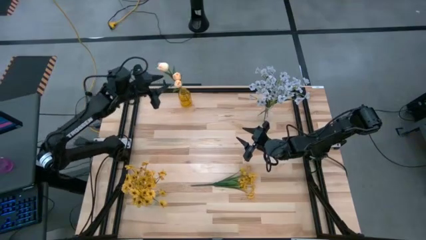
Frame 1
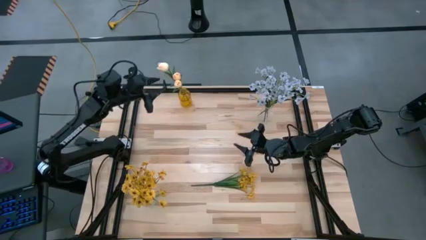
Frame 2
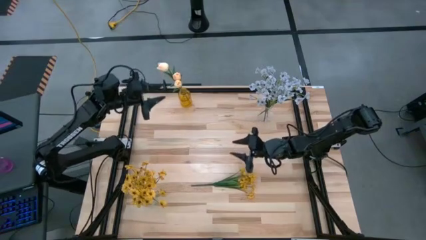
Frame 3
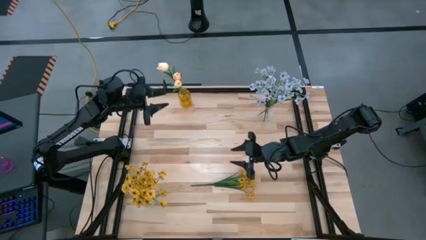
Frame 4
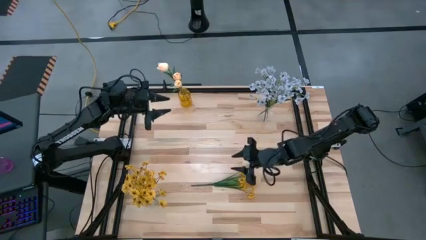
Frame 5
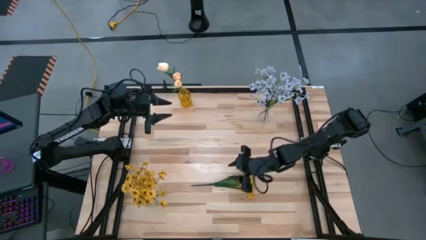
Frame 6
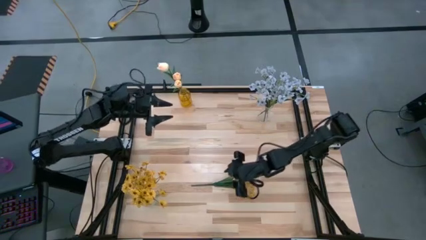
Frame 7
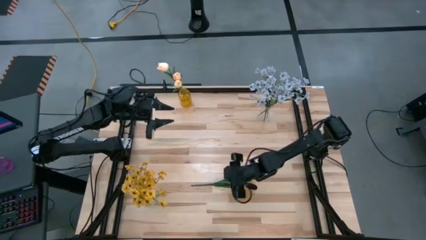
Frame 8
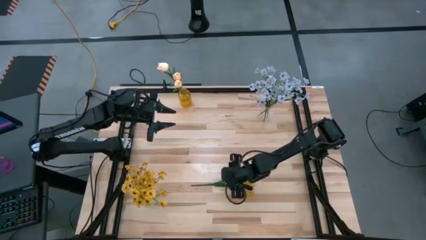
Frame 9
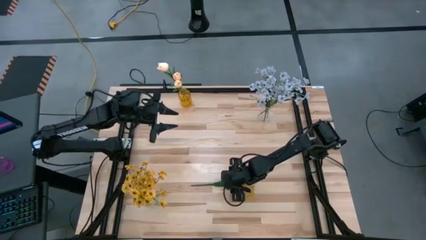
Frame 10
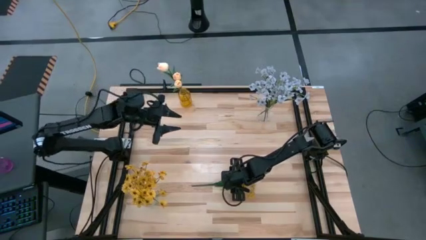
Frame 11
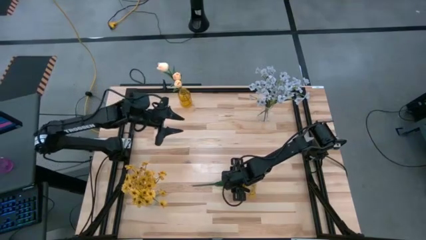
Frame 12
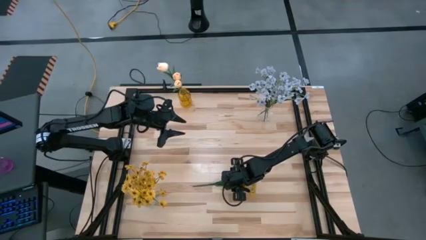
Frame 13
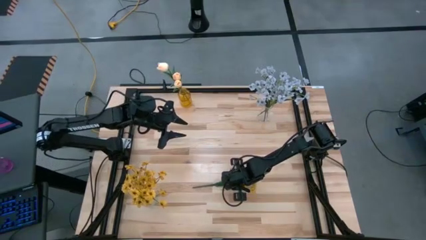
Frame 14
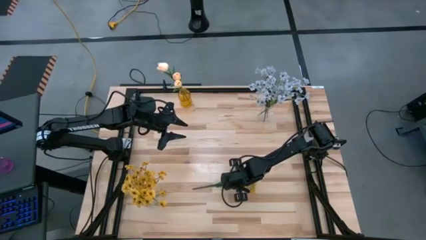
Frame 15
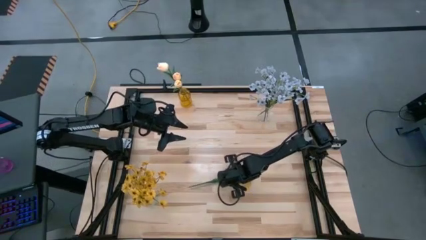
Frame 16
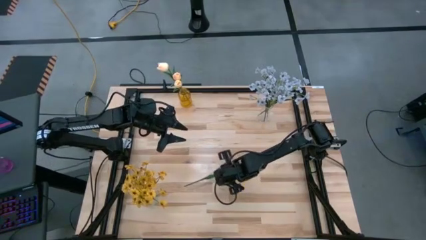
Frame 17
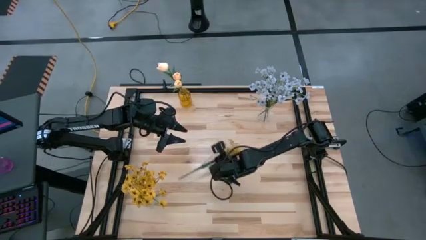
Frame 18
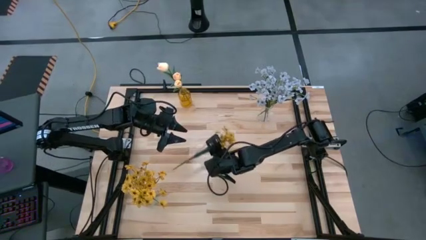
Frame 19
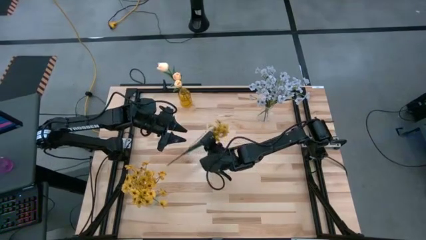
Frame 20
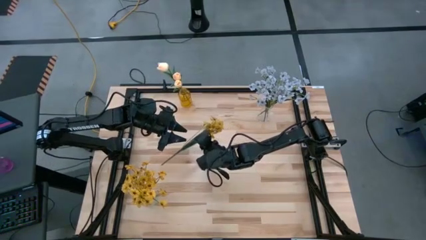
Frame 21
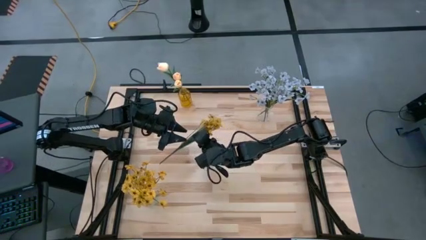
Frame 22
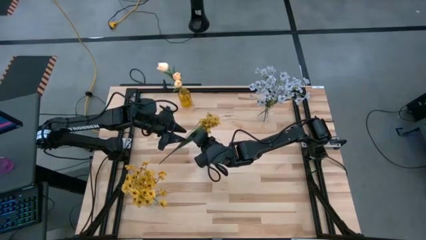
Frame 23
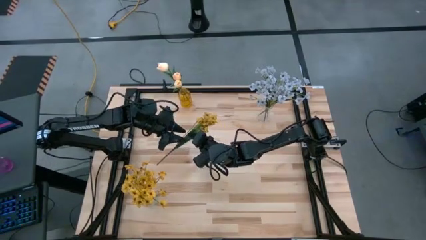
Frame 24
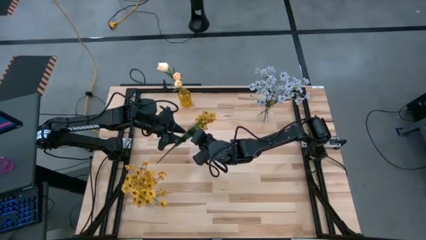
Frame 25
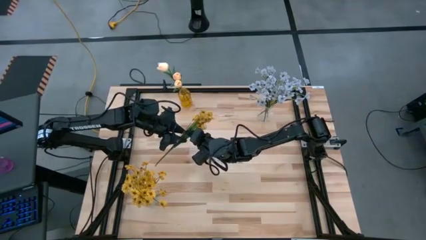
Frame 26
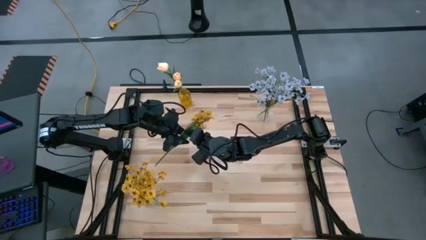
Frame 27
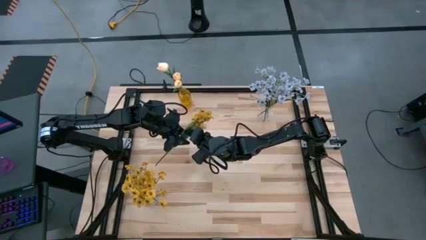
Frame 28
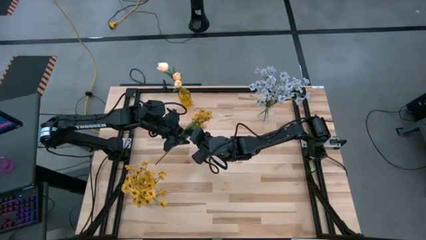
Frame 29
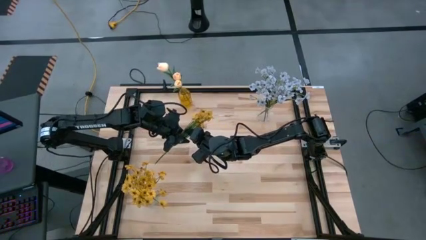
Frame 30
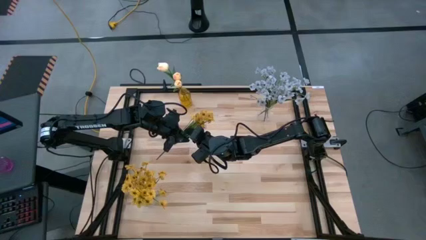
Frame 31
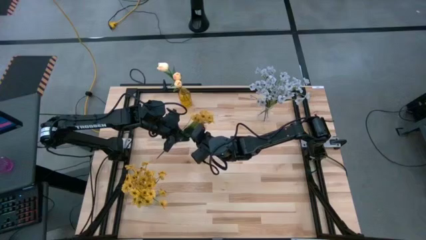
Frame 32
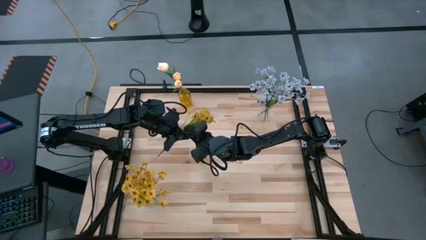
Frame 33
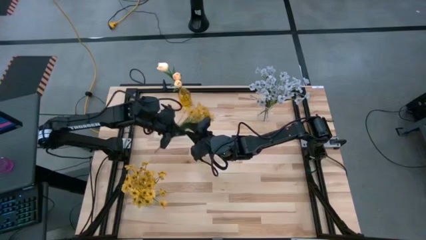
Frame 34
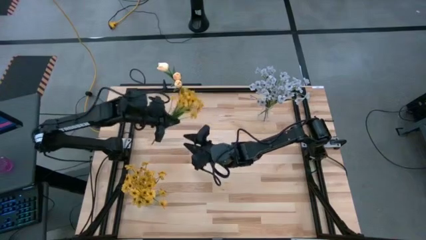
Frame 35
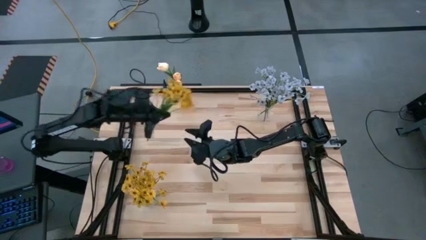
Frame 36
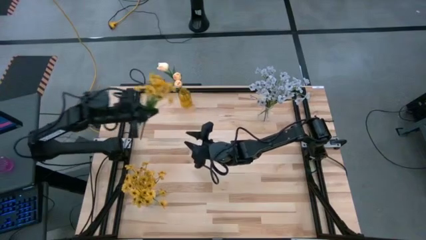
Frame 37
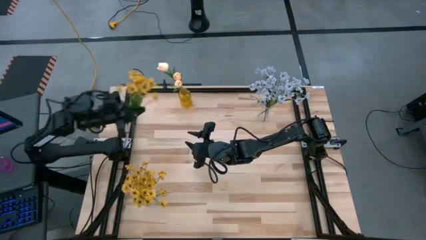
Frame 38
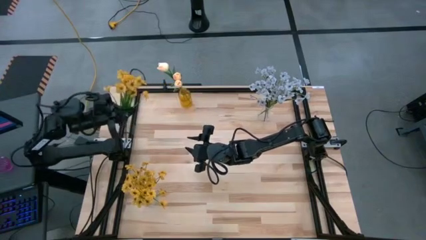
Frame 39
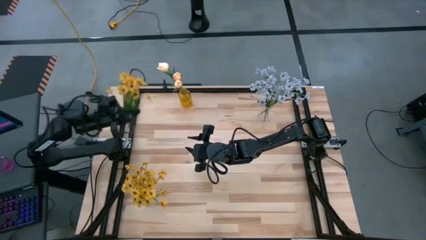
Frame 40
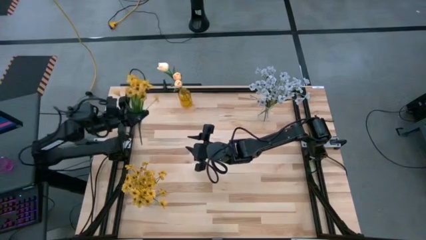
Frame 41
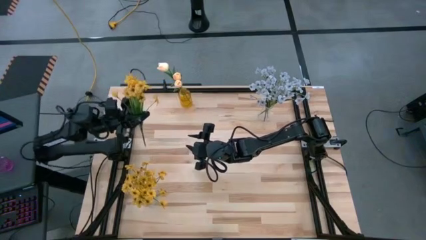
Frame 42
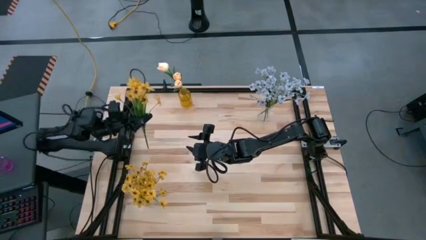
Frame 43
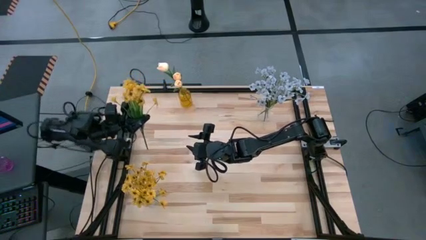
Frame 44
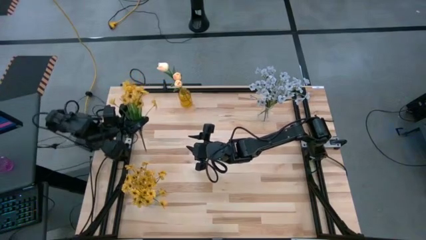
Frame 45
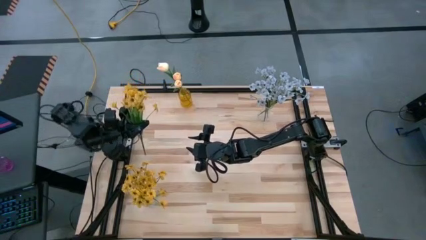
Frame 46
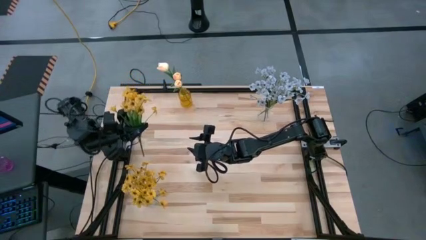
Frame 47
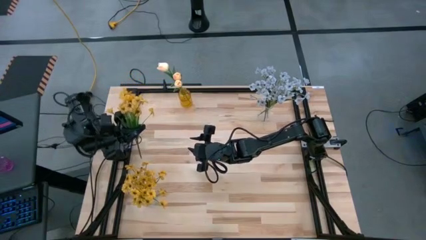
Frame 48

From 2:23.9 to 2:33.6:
Task: Sort flowers into vase by color
Put the yellow flowers into the bottom transparent vase

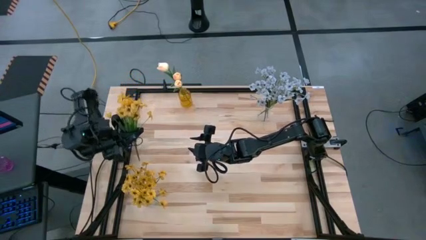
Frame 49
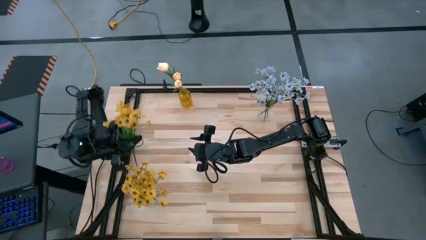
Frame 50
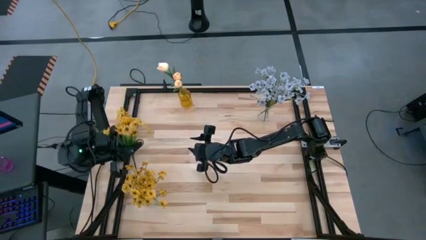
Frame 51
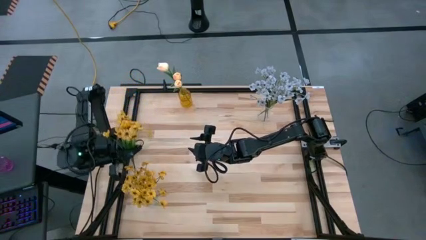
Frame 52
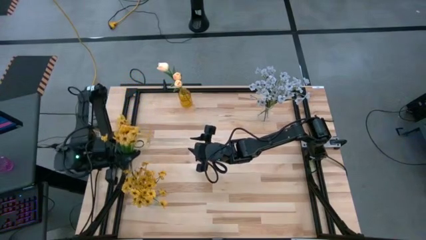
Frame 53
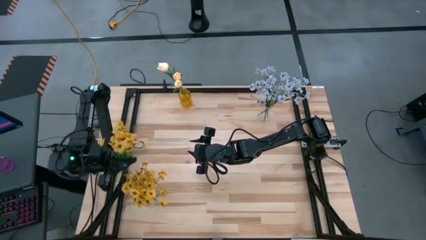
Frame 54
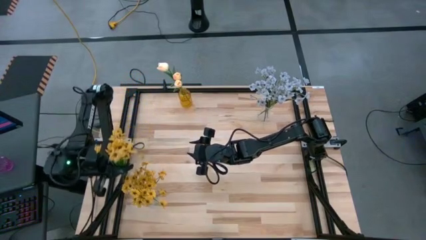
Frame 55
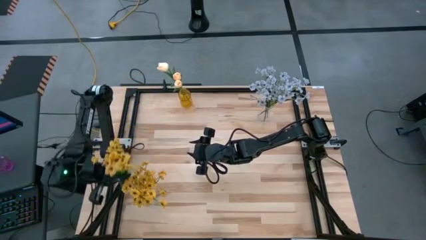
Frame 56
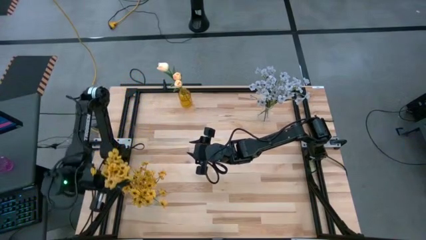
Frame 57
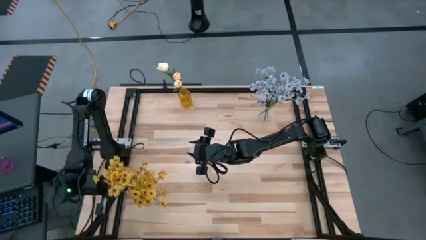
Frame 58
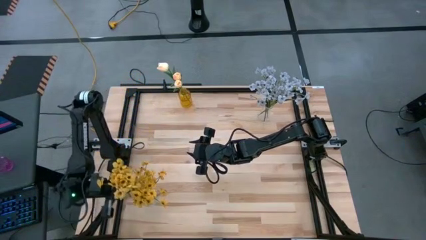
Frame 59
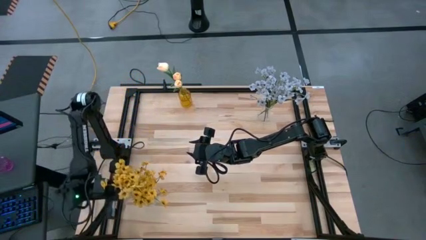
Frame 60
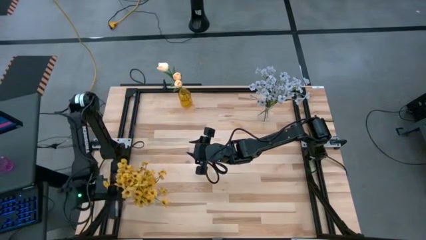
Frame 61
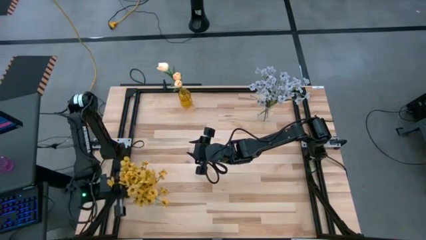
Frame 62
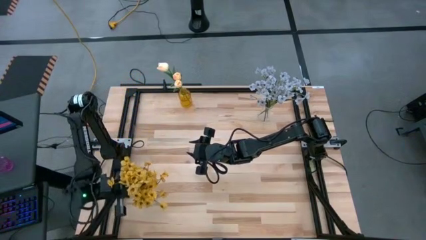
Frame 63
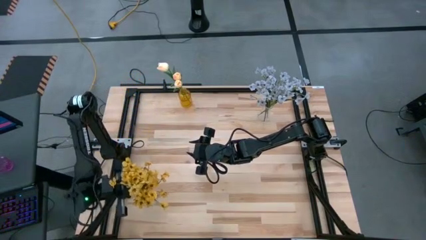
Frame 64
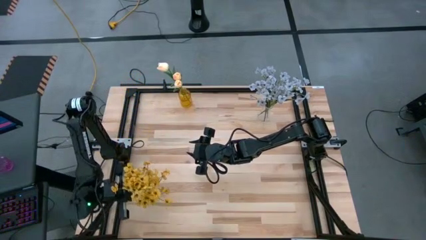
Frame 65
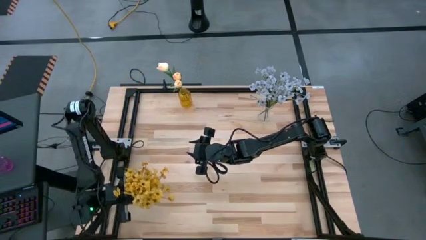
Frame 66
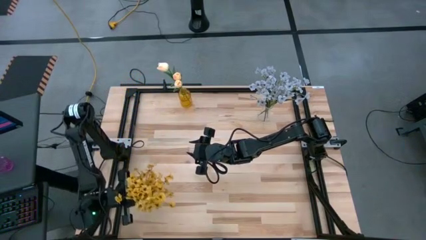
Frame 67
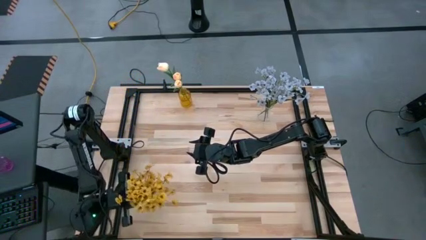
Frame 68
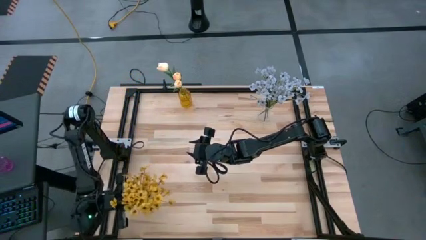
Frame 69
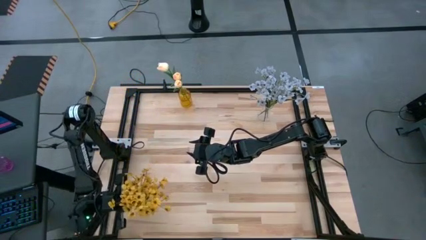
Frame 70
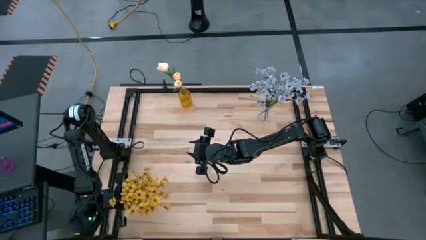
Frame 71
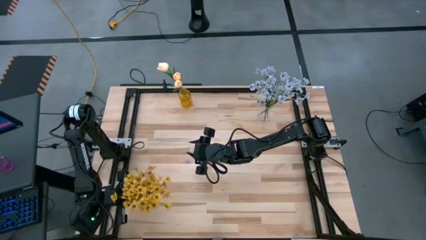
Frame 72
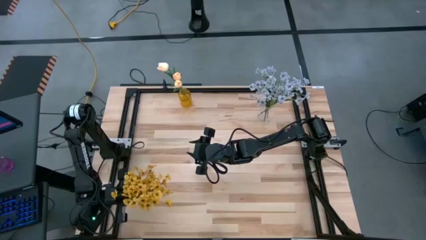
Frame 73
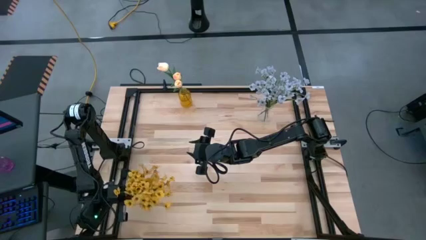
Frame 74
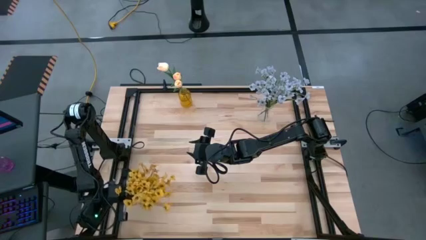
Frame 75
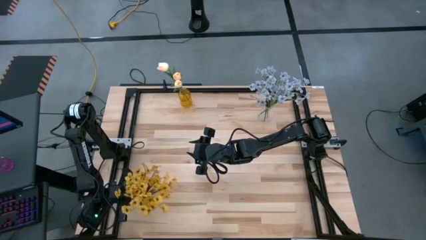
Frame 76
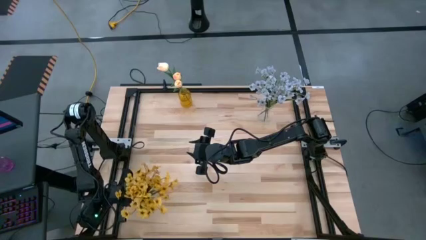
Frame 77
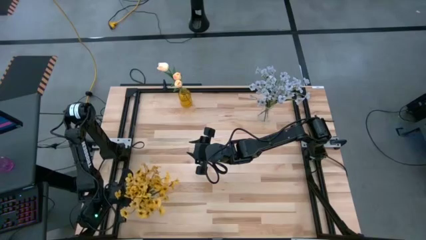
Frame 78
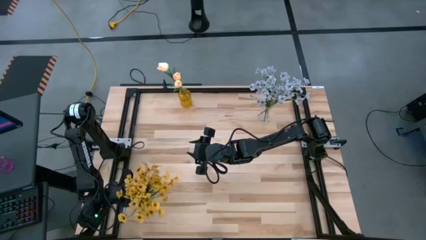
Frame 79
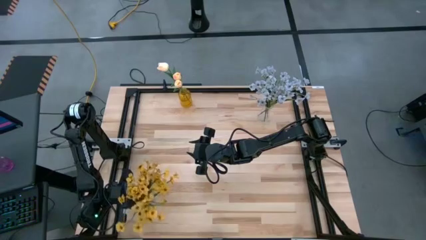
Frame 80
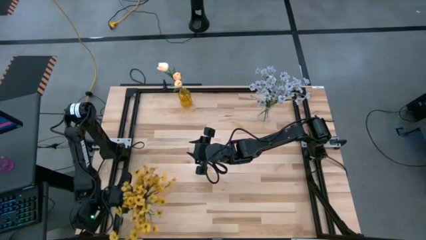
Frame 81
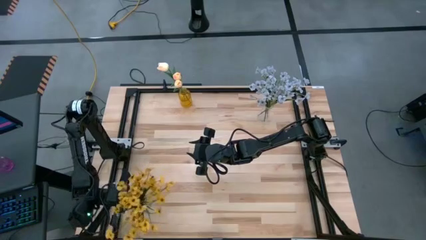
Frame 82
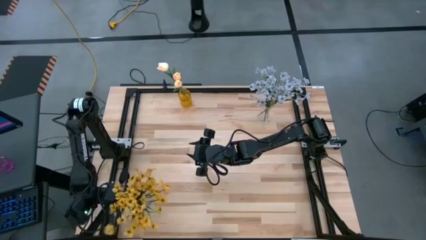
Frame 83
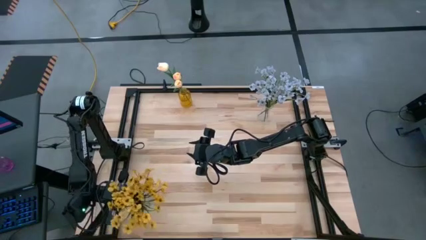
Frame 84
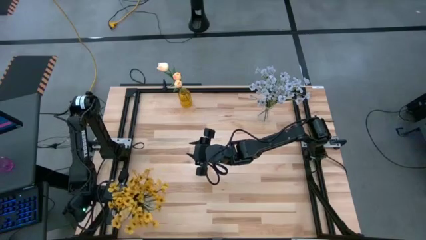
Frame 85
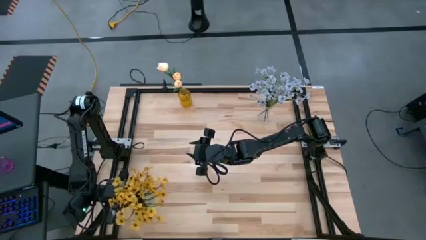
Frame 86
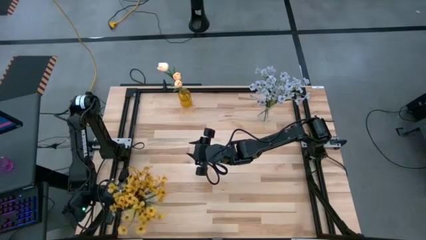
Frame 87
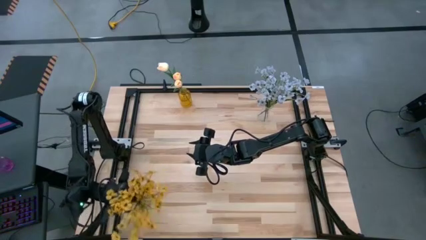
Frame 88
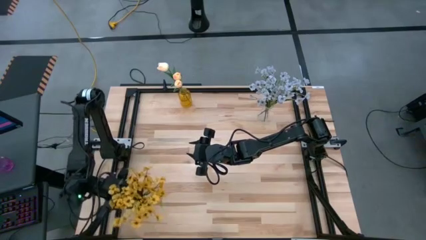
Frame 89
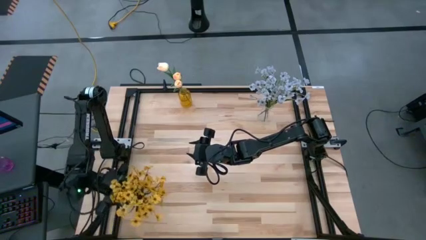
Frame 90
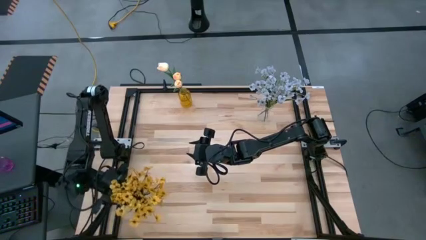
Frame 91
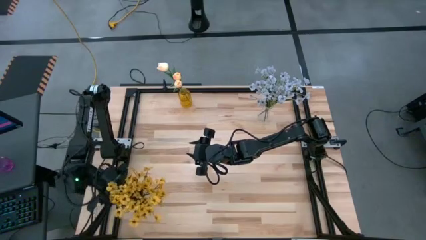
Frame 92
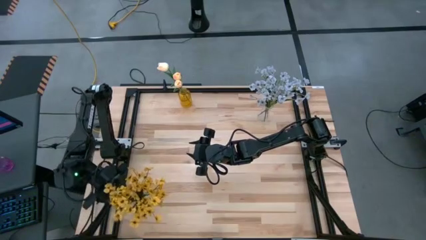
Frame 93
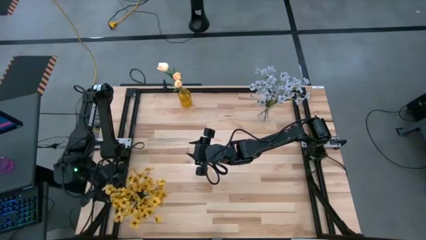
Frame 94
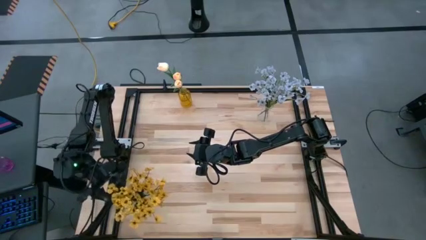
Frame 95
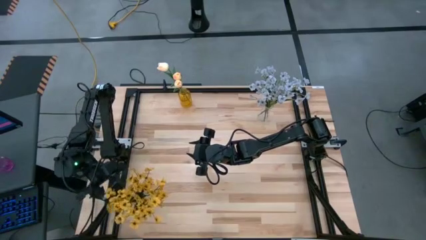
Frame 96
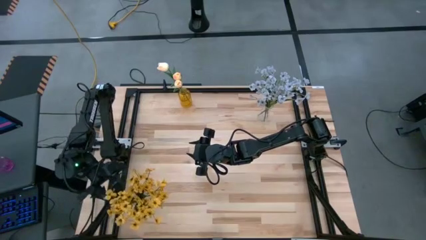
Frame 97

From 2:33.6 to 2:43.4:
Put the yellow flowers into the bottom transparent vase
